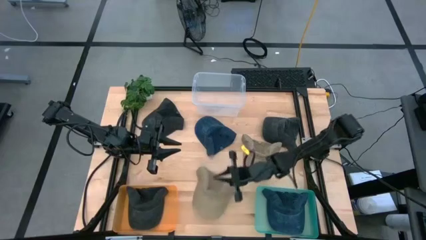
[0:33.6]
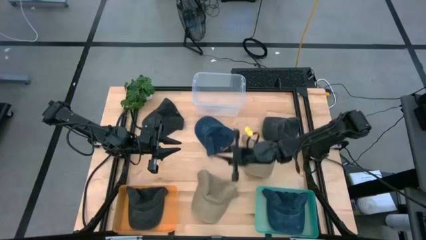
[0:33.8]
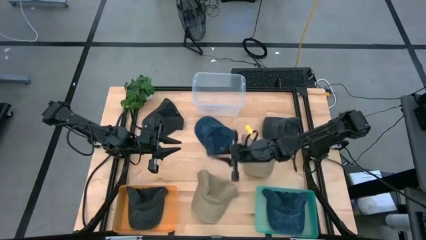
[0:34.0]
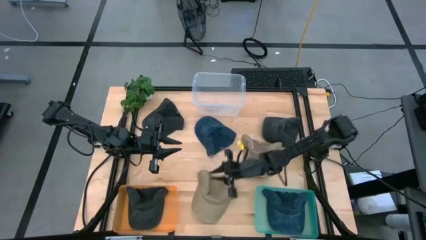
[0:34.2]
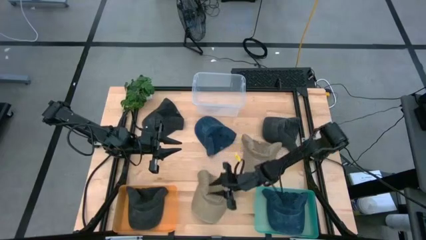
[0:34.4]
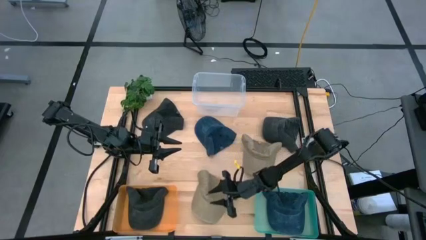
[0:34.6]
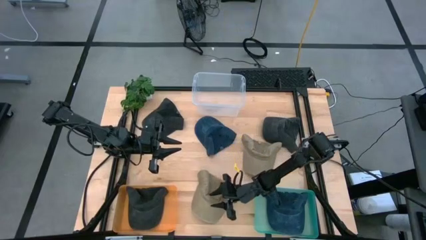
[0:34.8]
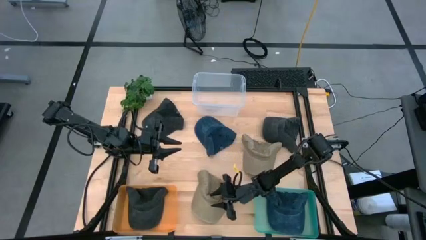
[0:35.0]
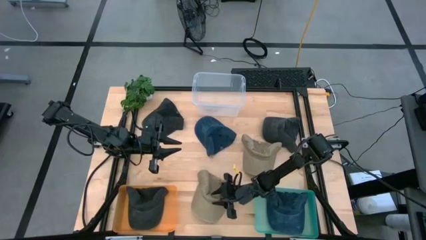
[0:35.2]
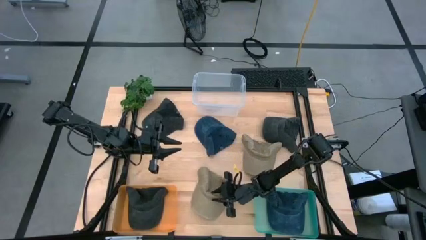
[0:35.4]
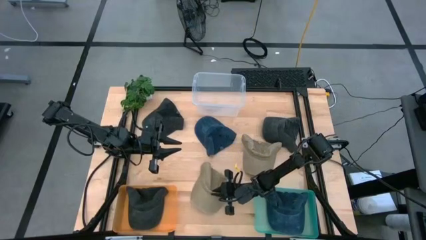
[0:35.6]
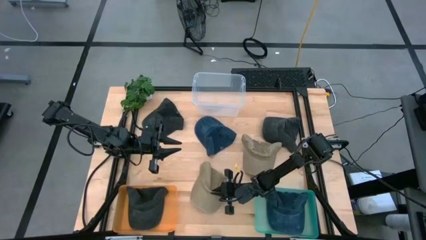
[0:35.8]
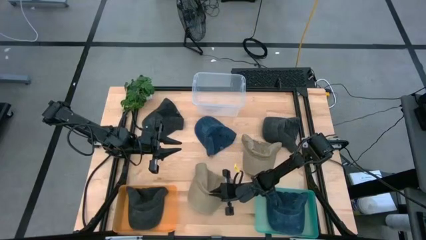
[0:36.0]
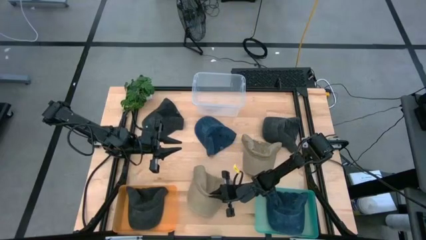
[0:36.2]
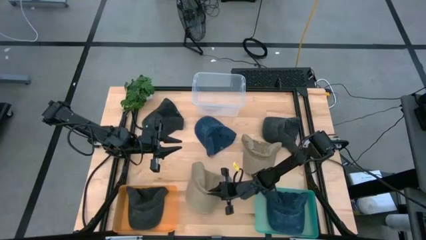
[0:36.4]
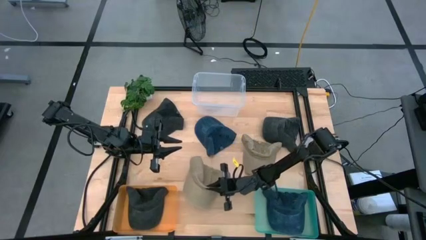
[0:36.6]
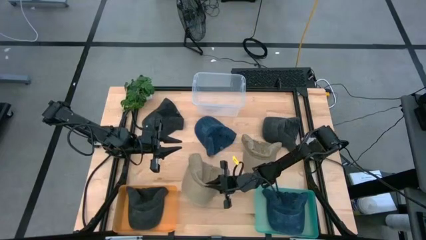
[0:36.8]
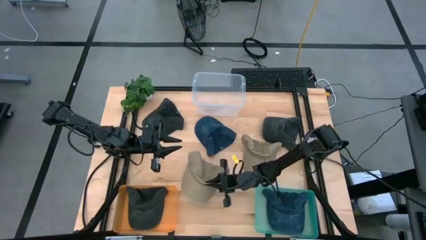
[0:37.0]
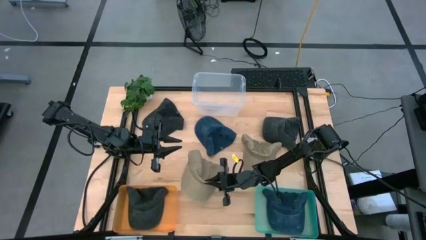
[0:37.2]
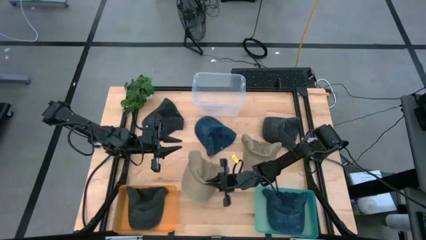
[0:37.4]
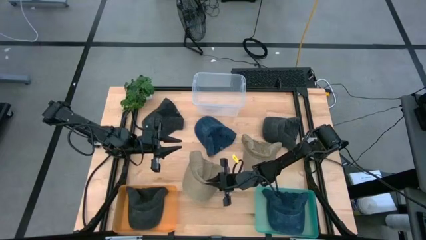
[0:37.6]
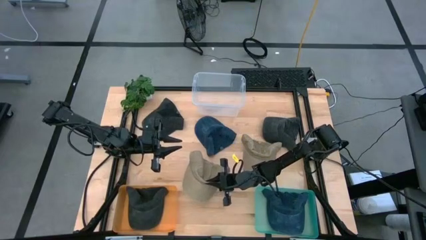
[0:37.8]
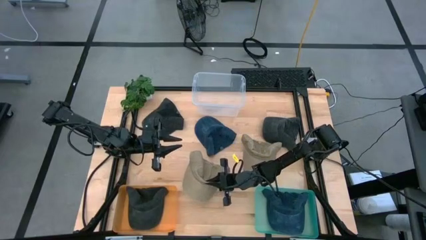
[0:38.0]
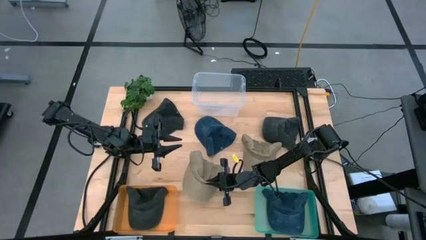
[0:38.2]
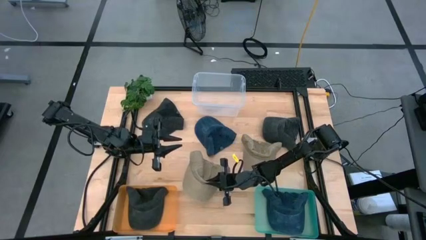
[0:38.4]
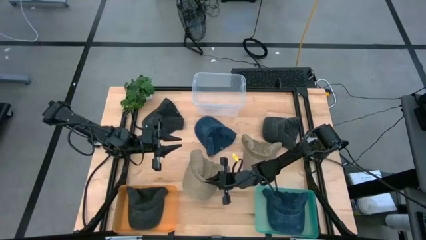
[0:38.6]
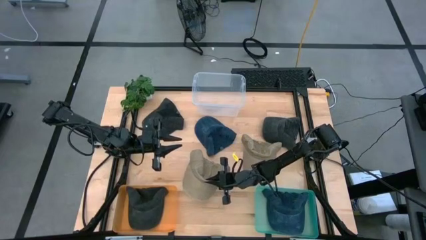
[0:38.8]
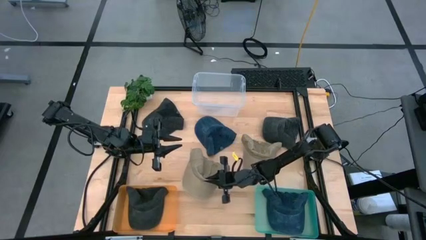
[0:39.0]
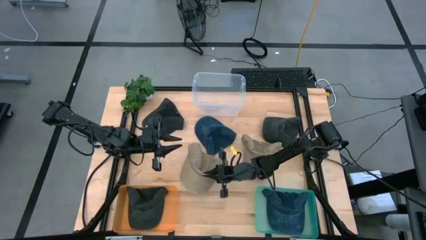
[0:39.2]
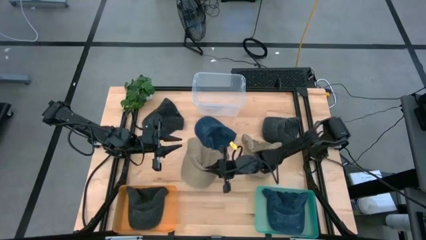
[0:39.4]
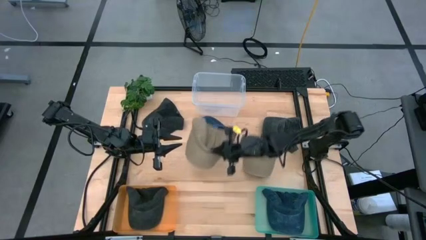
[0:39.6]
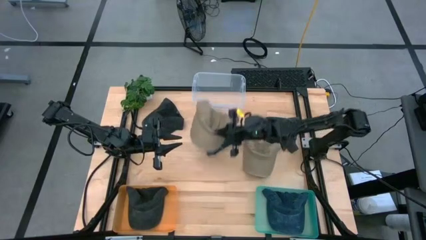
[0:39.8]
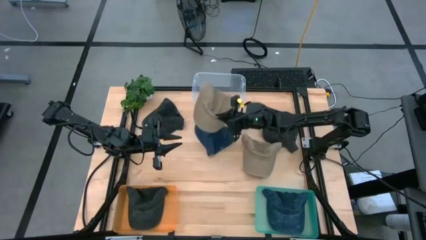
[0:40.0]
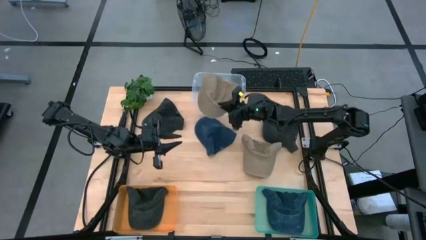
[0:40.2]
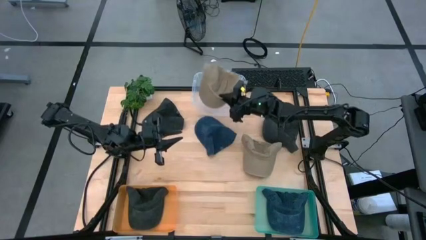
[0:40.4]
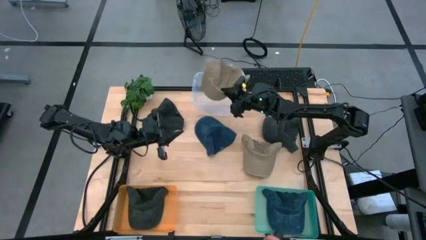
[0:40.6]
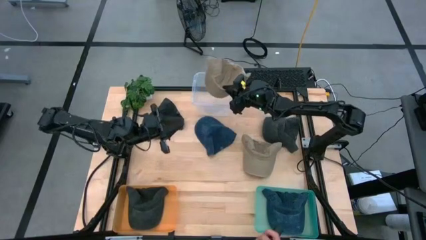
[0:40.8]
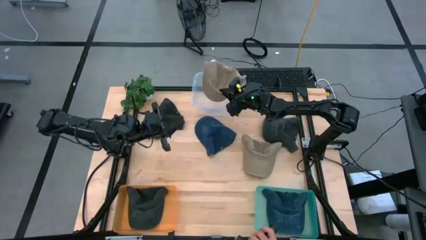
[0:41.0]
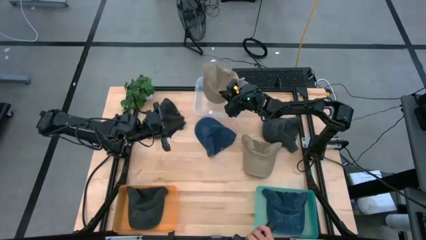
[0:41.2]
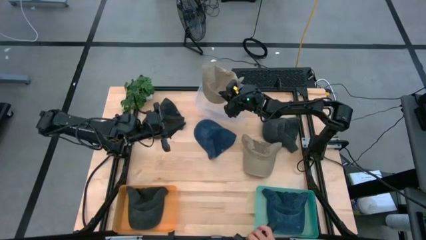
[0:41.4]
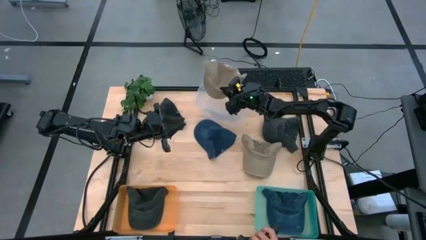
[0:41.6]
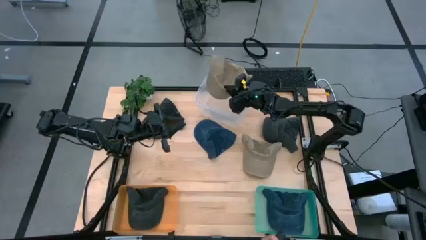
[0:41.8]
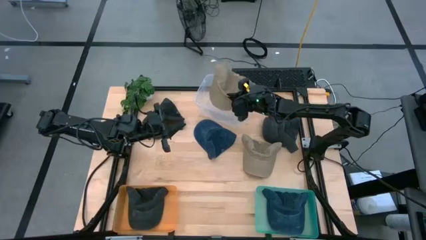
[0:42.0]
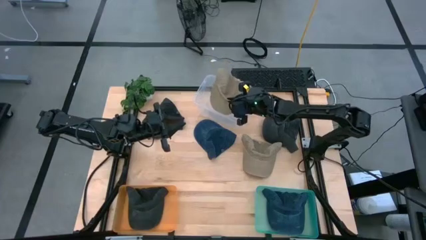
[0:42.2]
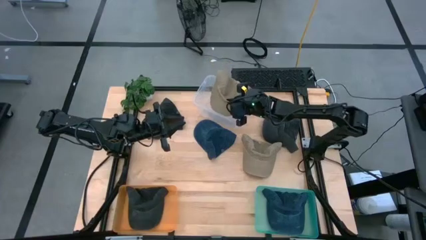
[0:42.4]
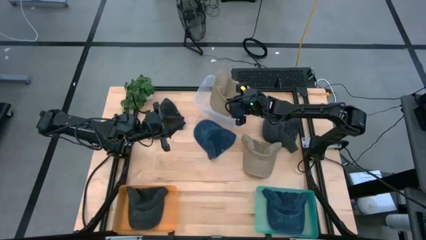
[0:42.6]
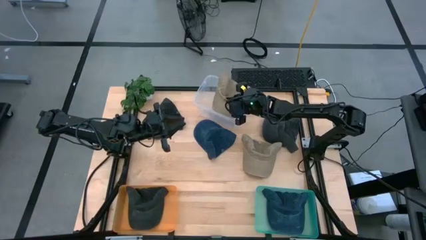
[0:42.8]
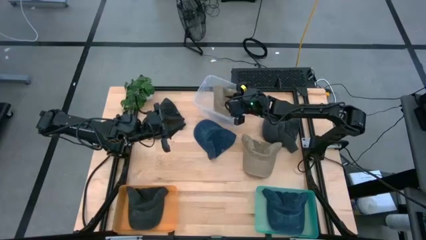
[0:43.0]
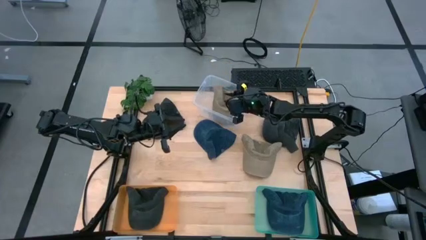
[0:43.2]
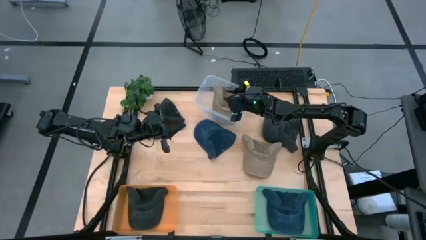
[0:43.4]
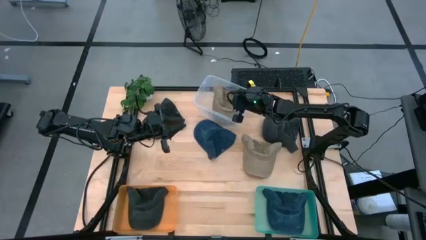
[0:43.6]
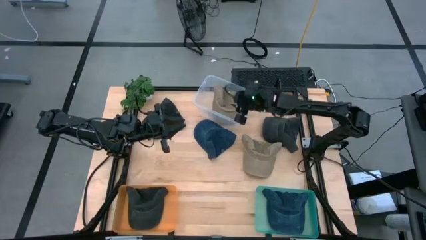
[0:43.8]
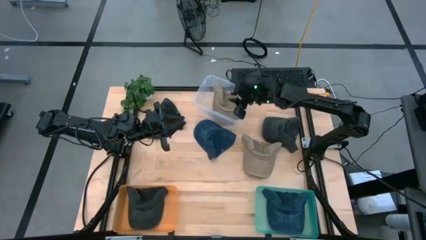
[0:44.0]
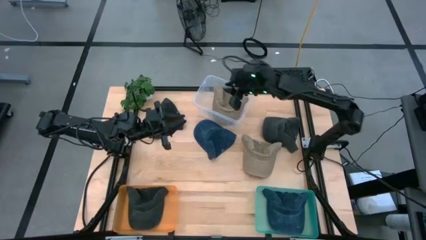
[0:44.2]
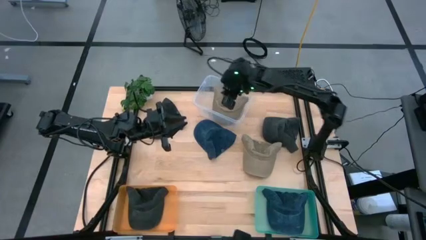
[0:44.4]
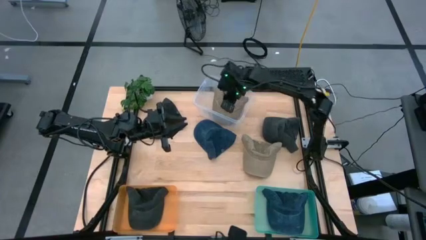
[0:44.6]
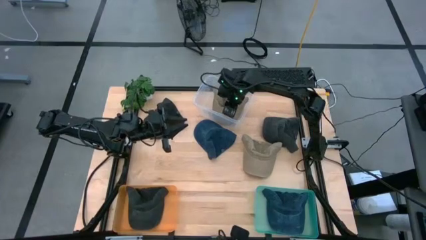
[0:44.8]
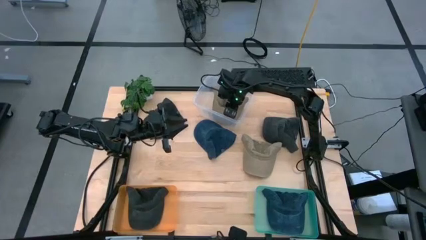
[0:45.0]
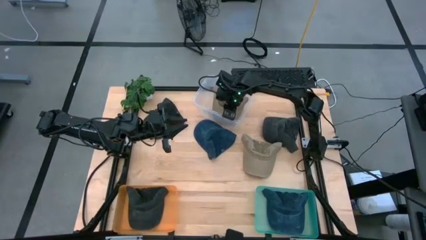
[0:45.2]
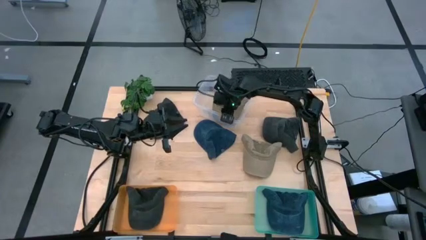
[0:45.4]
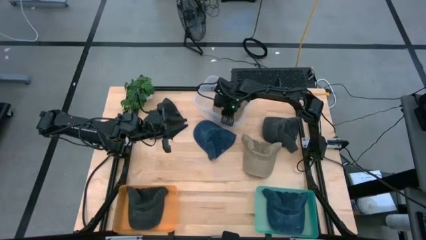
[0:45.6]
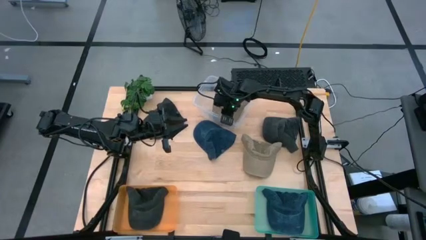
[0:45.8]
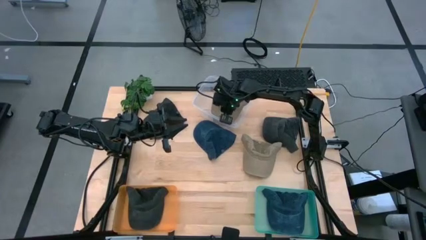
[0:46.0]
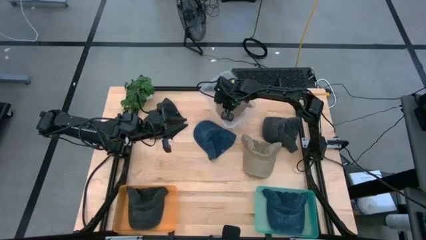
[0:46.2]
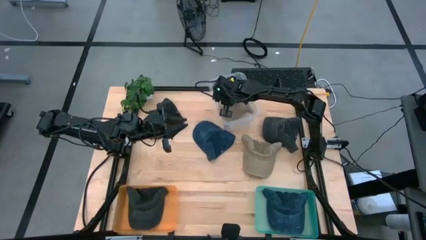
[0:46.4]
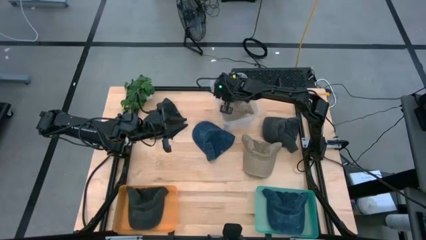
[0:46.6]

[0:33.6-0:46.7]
Task: Pick & Place hat
Put the left brown cap into the transparent bin

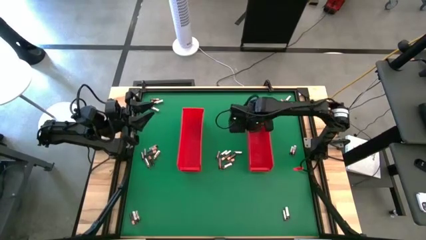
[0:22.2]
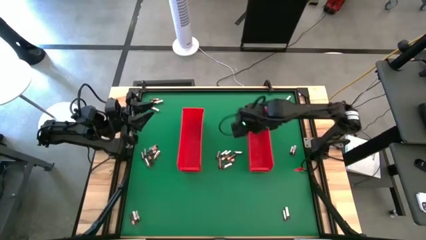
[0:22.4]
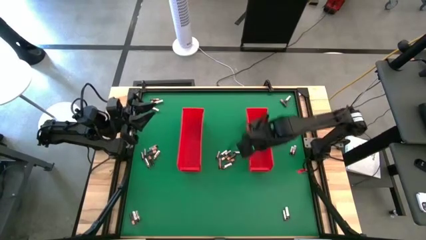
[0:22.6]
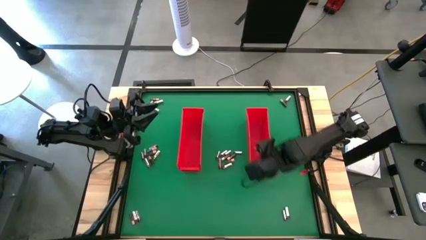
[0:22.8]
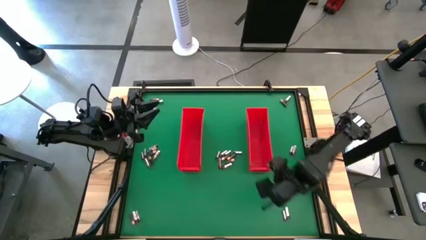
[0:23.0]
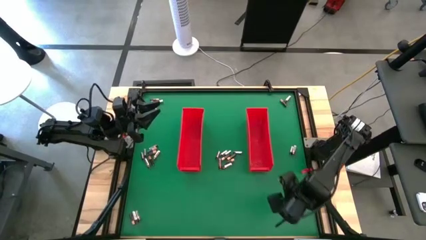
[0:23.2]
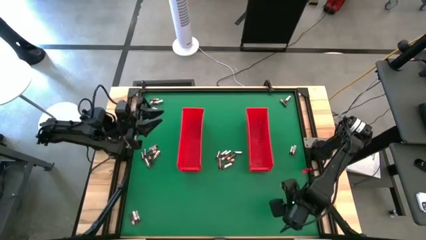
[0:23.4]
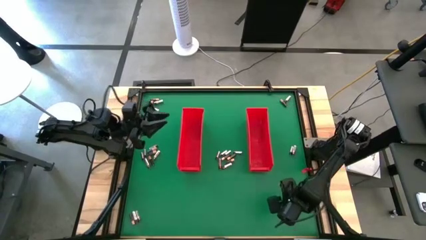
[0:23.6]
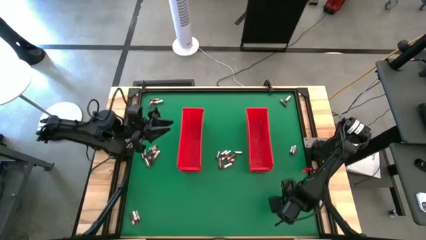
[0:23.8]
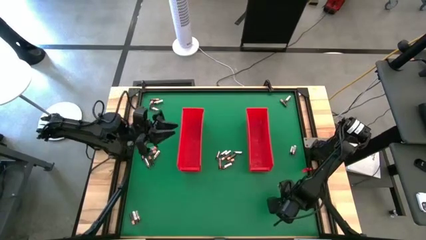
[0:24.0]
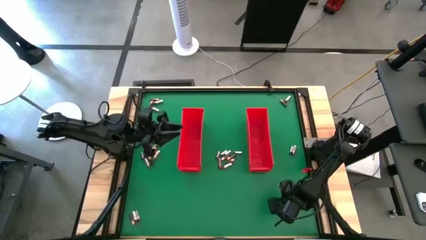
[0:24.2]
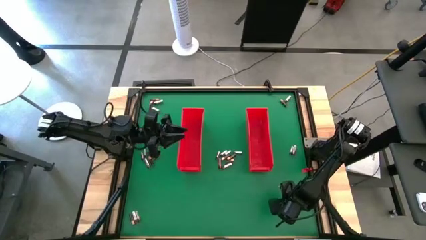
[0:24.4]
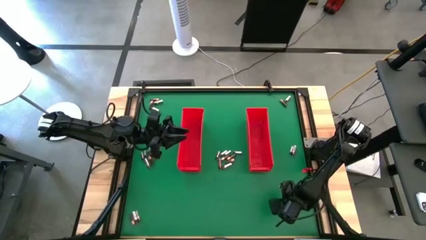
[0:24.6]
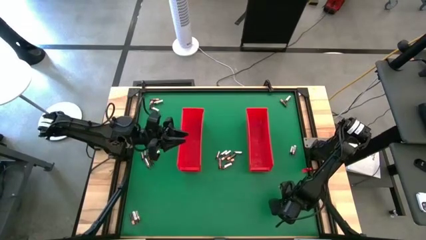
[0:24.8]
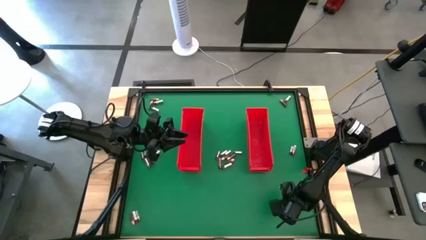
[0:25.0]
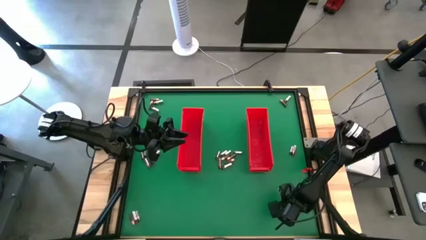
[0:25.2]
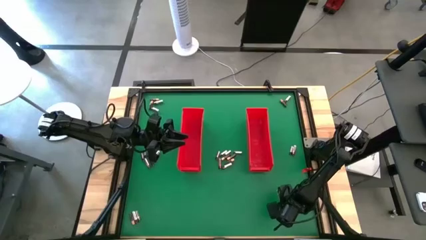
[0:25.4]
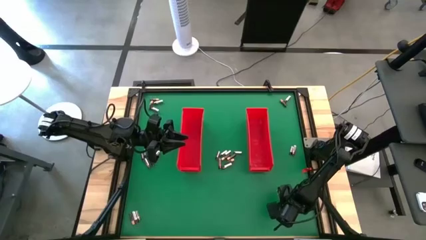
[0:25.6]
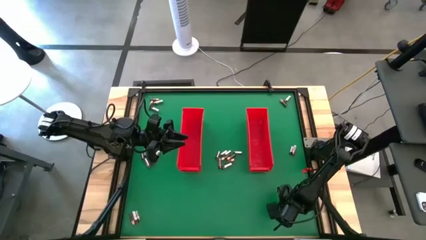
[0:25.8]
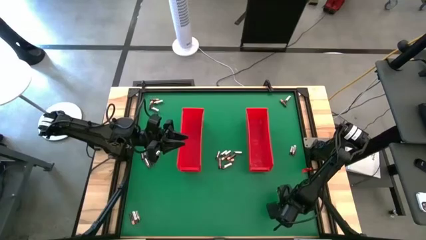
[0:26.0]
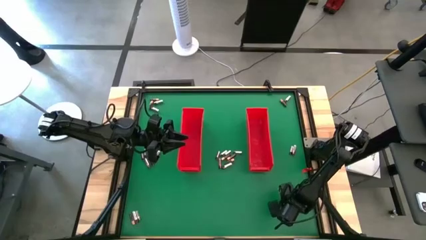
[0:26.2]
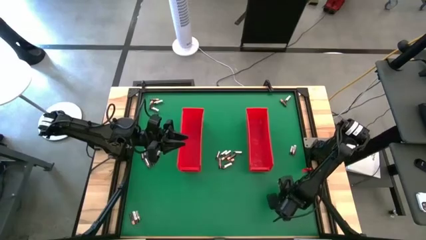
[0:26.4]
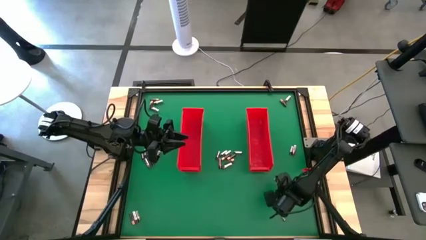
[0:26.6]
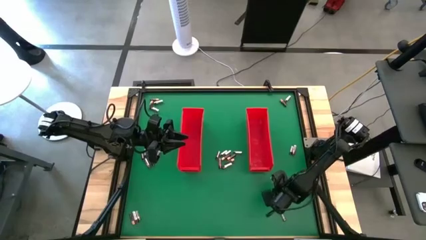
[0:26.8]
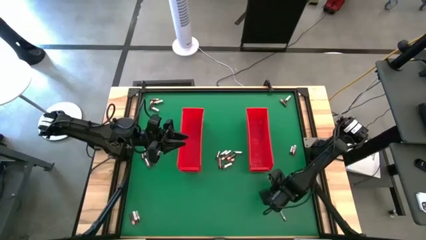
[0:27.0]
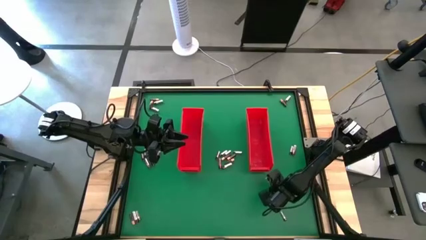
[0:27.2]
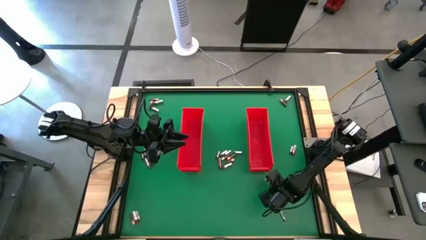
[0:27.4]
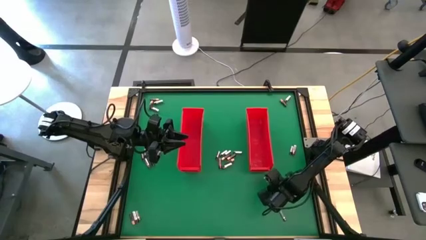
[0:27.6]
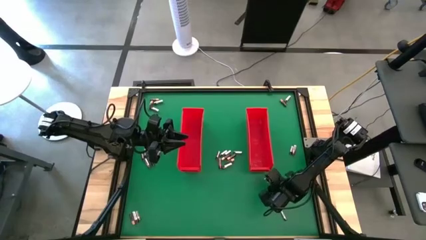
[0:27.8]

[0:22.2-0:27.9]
Task: Sort batteries
Put the silver battery into the right red bin
